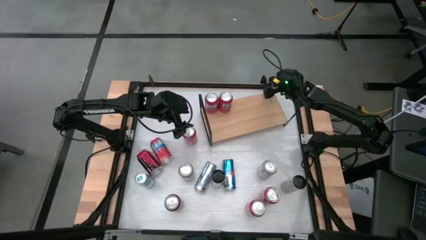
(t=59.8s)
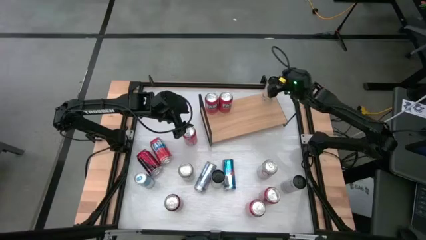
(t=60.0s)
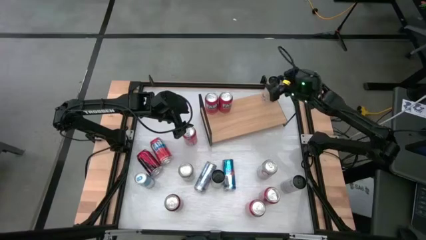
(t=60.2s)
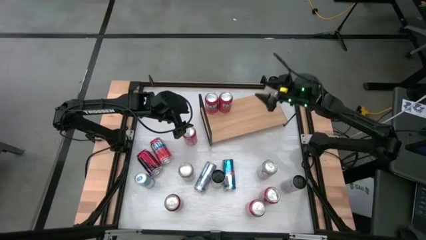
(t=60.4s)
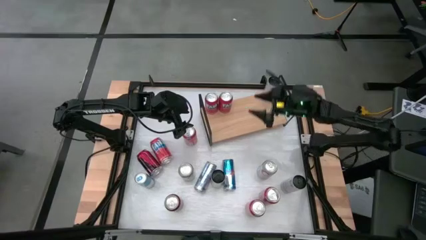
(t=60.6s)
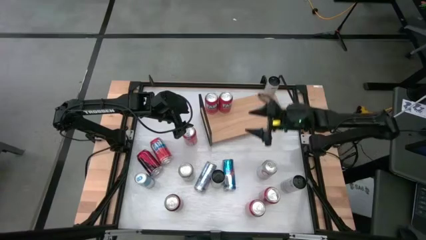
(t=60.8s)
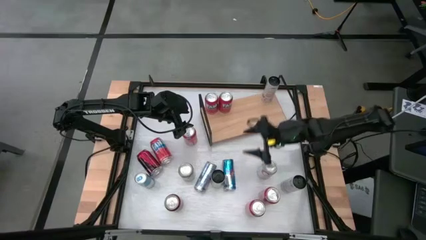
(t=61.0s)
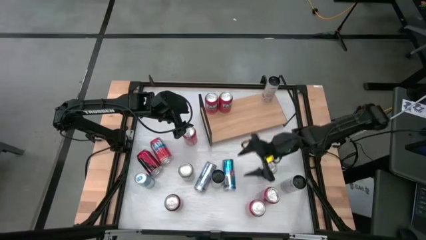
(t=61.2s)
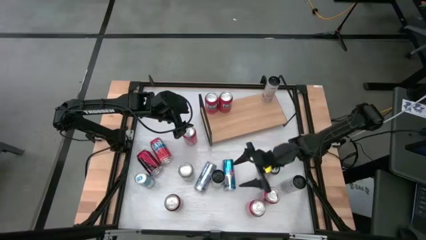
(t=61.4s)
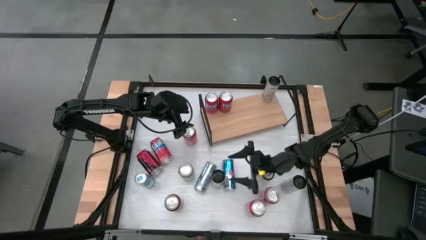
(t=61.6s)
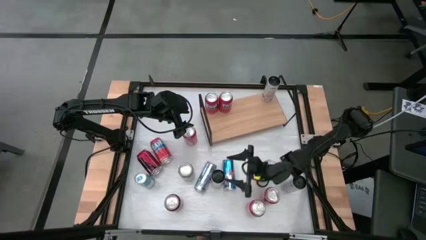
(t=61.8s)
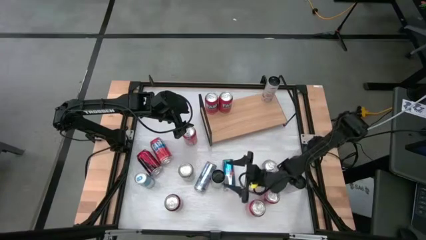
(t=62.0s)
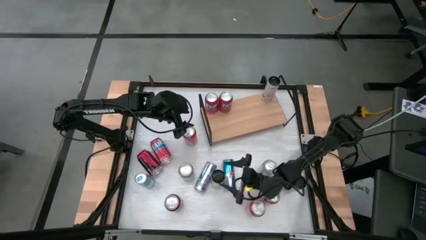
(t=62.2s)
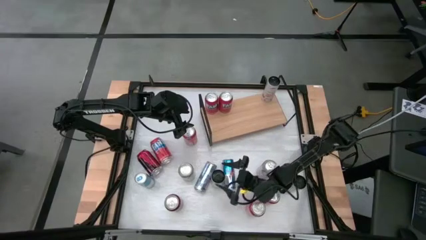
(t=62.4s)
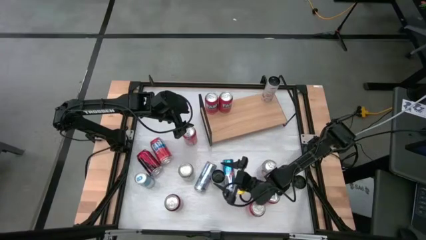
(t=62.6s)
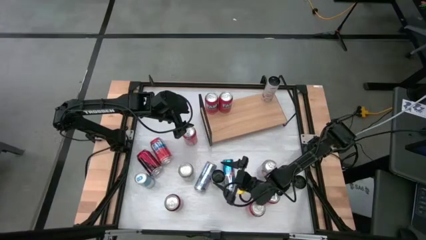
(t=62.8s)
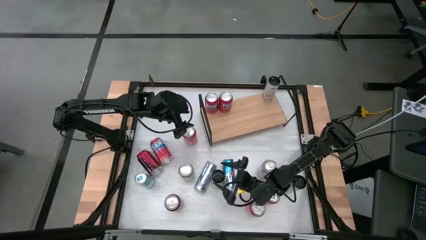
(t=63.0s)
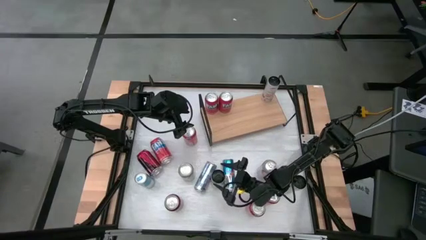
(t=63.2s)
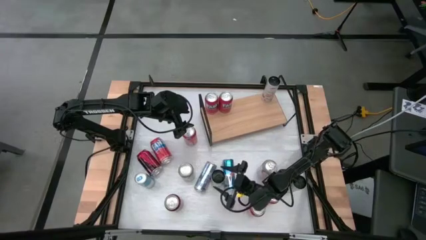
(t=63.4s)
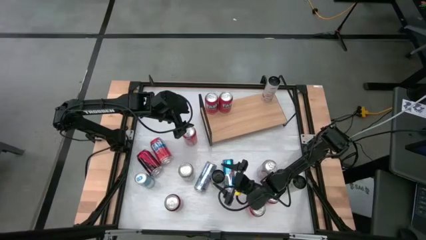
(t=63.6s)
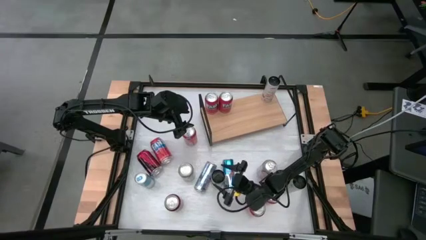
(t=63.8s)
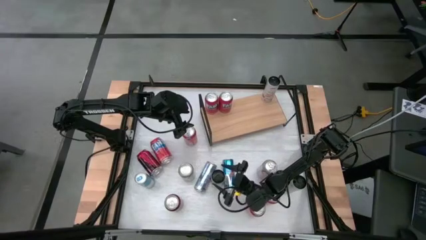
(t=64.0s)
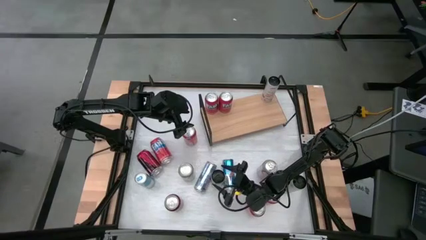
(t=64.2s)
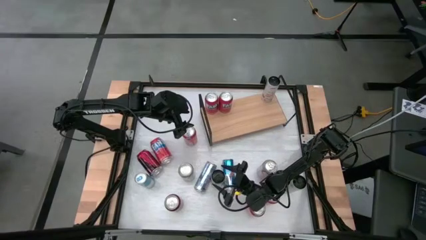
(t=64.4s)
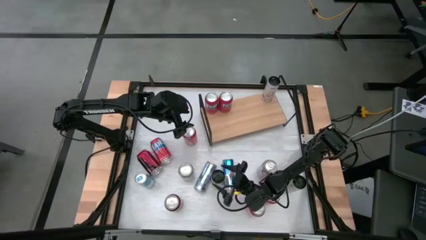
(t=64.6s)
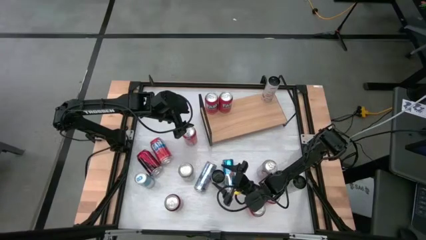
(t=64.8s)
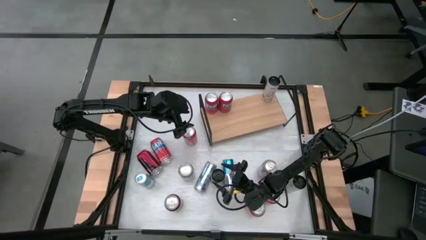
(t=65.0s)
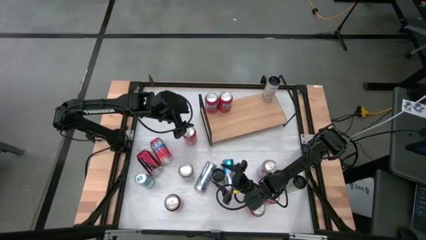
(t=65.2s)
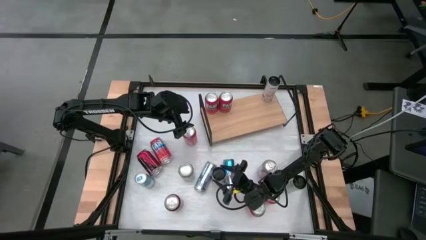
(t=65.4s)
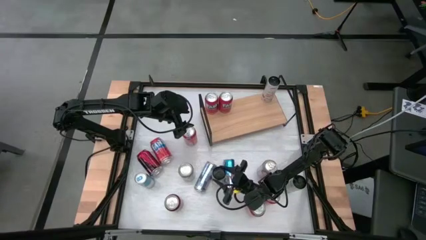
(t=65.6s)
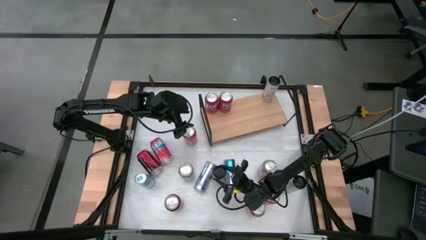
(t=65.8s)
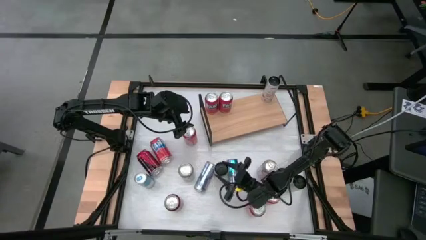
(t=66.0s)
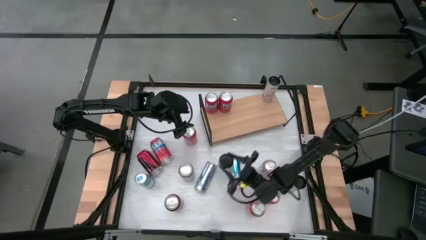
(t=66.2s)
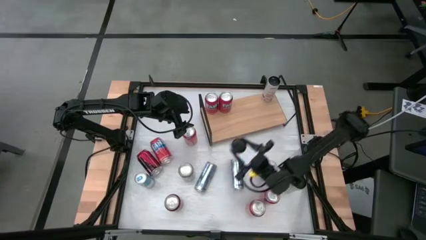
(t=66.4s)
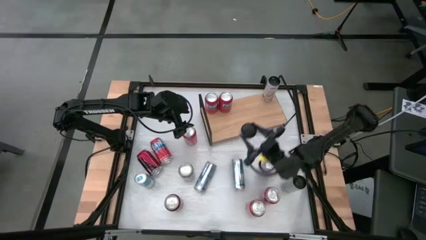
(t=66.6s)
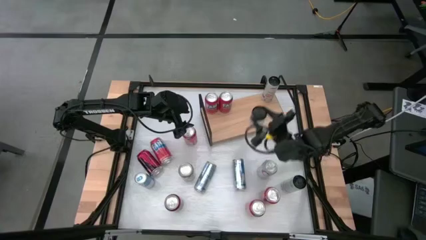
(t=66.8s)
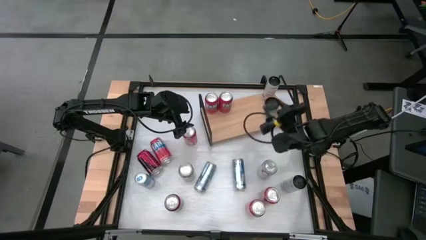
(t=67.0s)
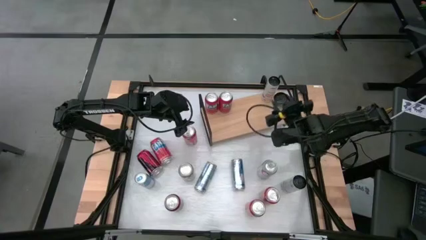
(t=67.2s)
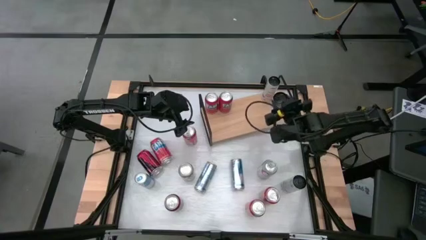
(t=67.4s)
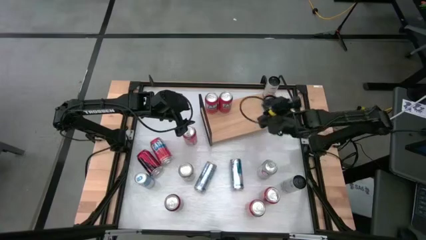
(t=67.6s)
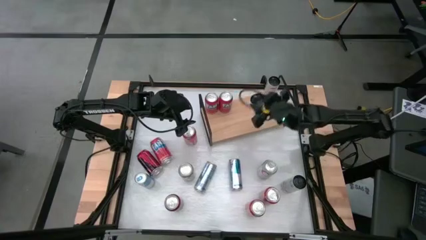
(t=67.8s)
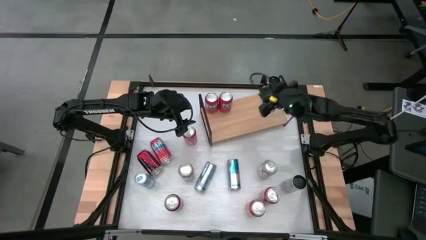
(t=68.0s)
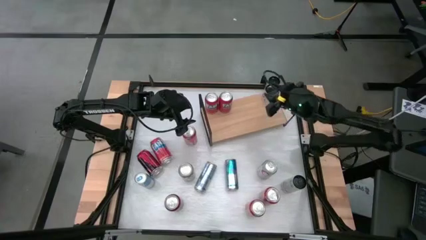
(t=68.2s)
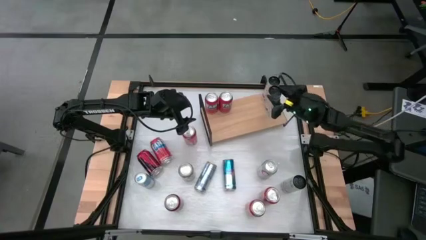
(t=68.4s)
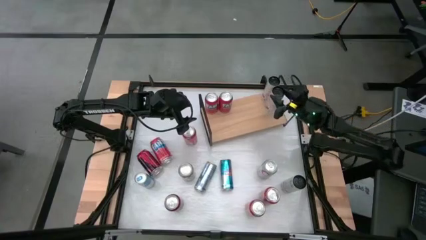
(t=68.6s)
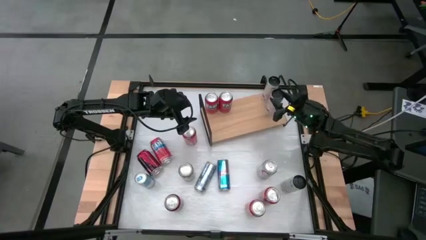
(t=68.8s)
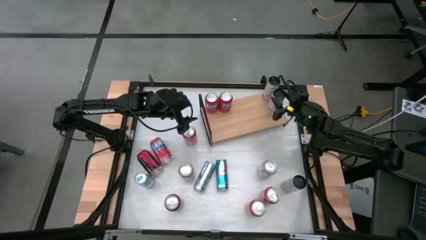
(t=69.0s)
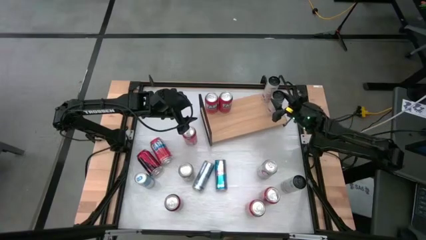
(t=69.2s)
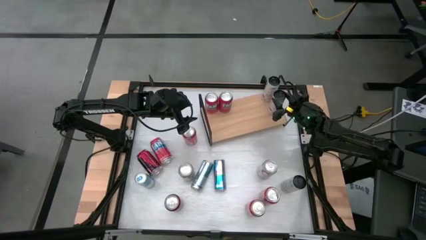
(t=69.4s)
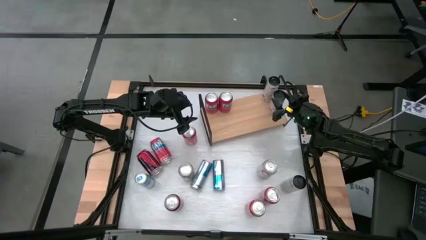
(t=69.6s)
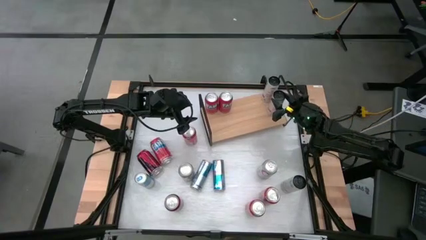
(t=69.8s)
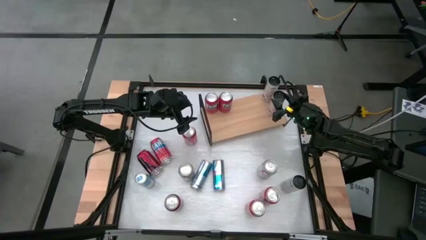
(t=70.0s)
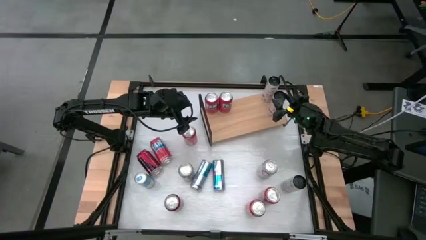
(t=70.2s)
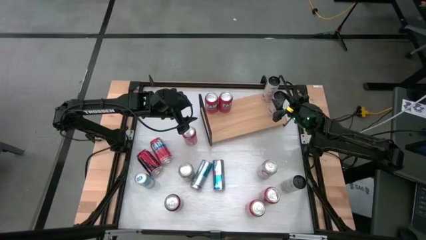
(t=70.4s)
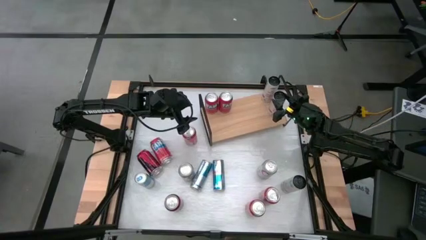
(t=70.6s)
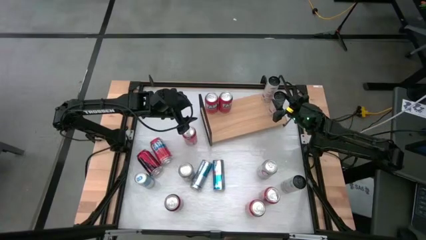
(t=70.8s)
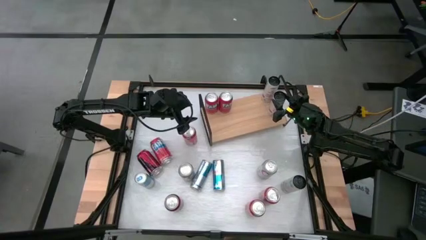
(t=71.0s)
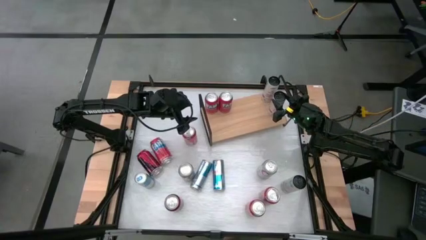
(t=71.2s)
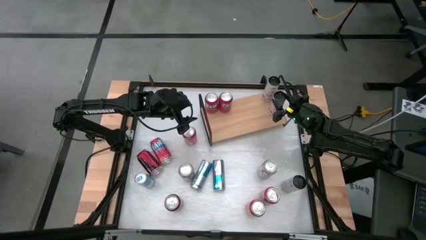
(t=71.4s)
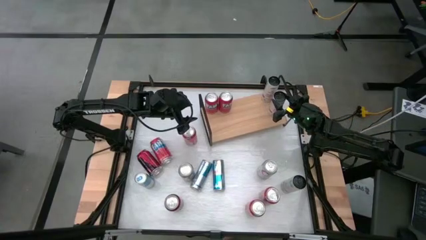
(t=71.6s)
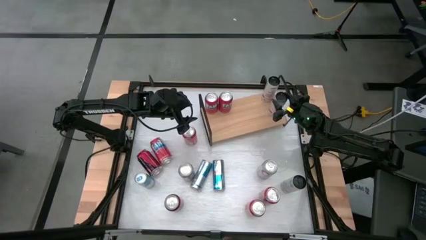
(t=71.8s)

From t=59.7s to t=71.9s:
Task: Place canned beverage on shelf
Put the bottom left black soda can on the shelf
